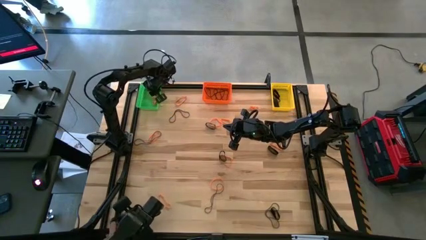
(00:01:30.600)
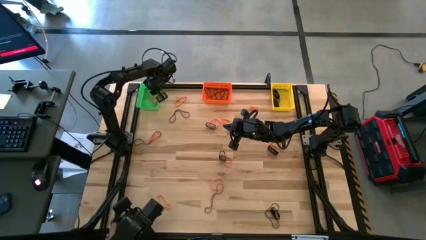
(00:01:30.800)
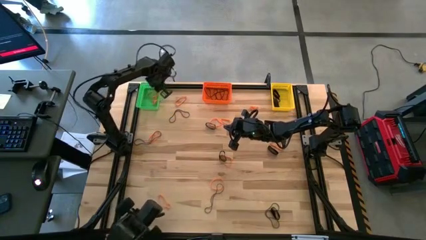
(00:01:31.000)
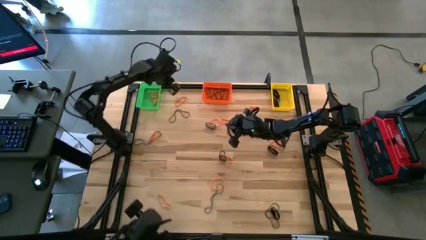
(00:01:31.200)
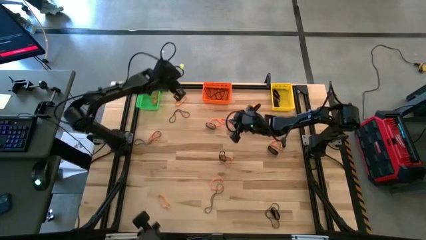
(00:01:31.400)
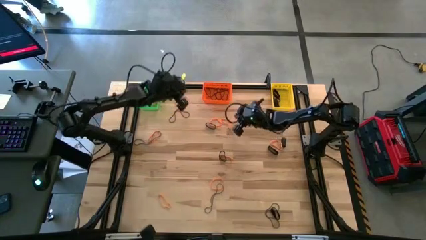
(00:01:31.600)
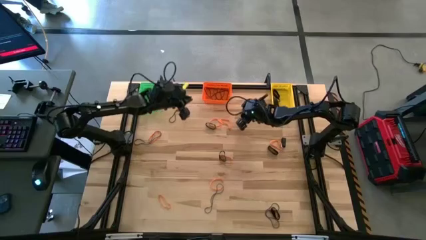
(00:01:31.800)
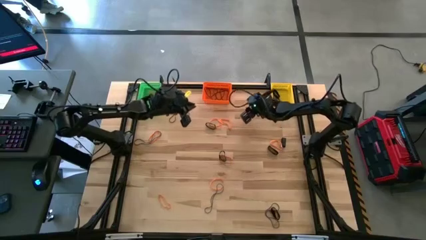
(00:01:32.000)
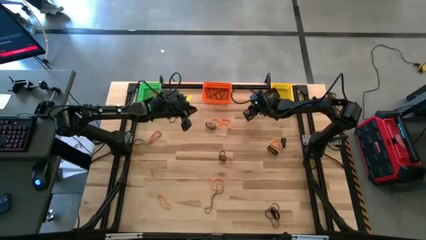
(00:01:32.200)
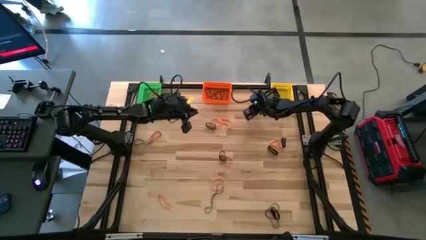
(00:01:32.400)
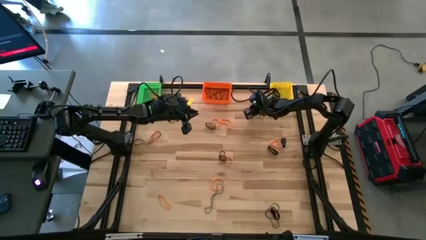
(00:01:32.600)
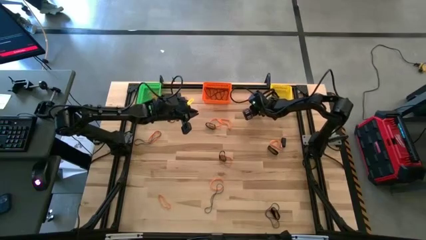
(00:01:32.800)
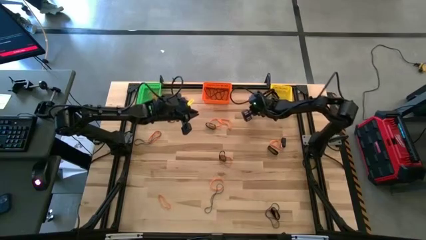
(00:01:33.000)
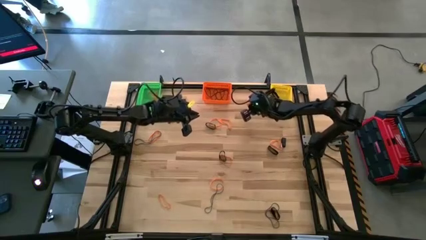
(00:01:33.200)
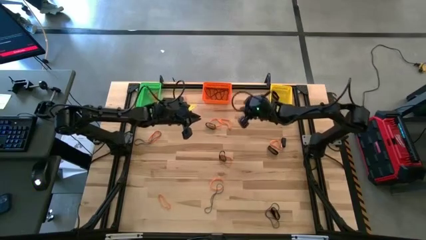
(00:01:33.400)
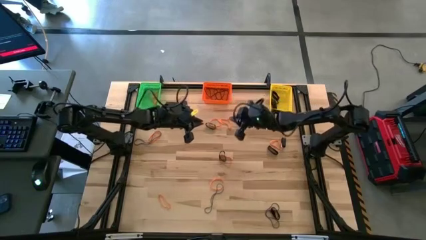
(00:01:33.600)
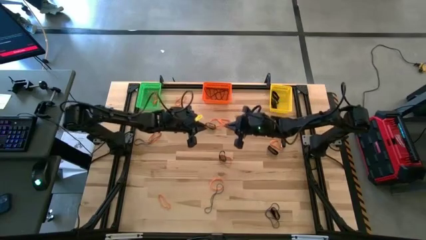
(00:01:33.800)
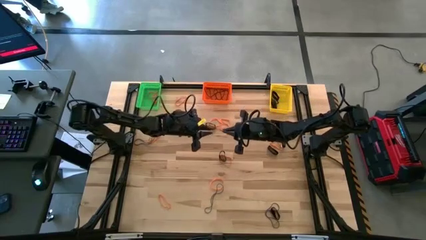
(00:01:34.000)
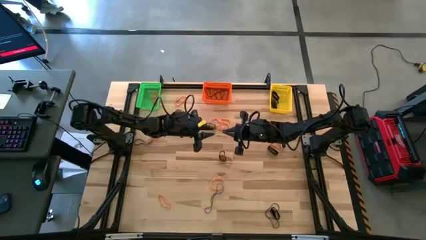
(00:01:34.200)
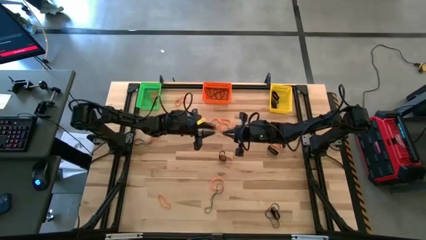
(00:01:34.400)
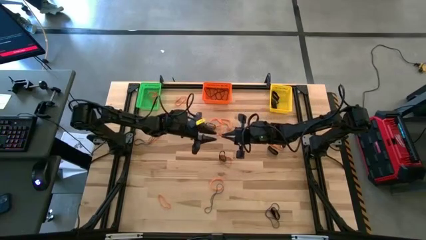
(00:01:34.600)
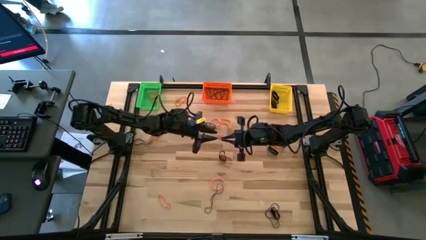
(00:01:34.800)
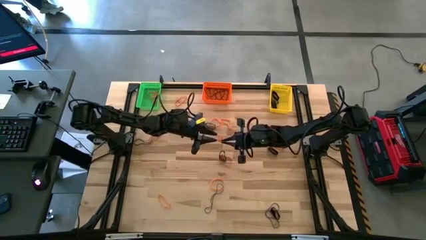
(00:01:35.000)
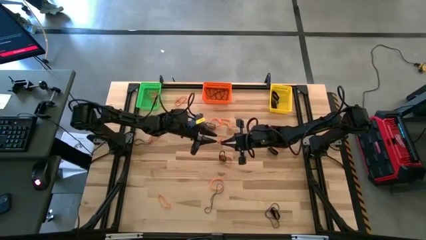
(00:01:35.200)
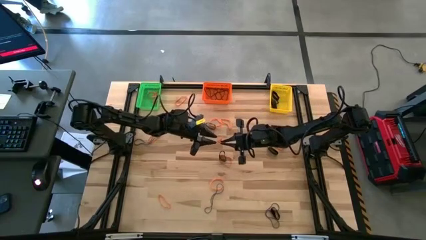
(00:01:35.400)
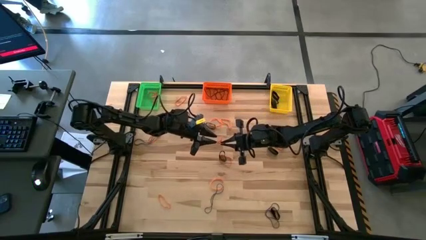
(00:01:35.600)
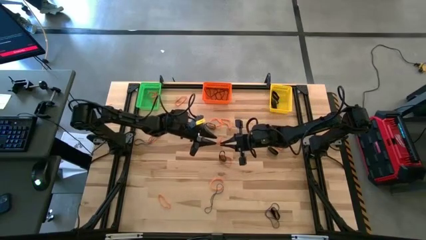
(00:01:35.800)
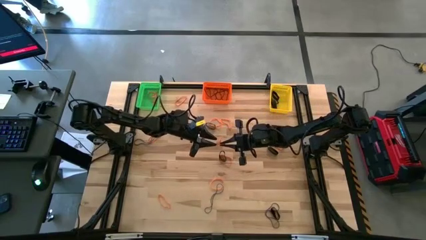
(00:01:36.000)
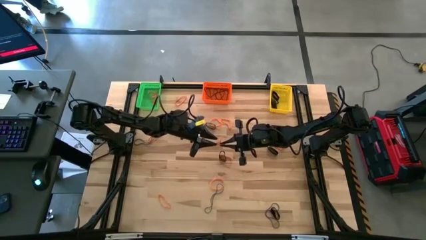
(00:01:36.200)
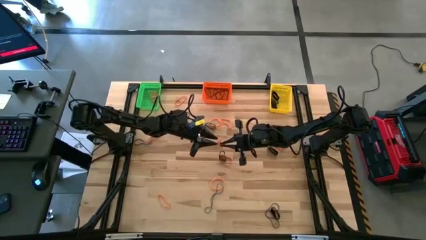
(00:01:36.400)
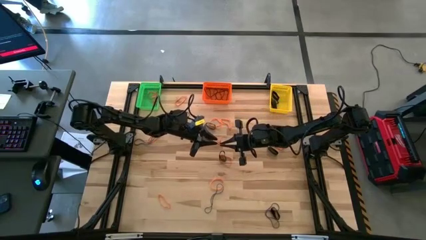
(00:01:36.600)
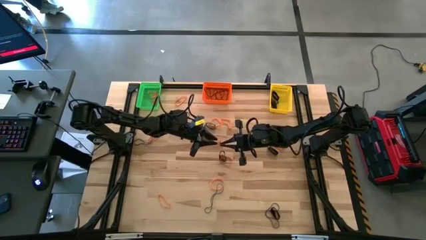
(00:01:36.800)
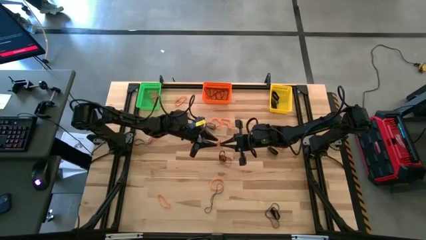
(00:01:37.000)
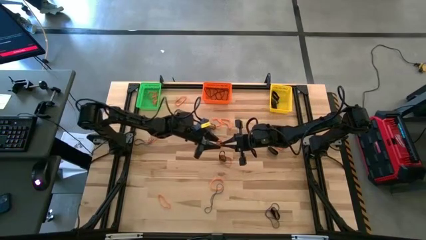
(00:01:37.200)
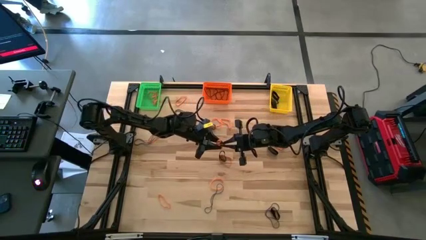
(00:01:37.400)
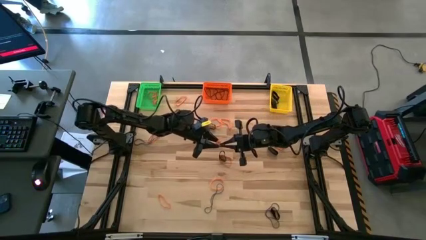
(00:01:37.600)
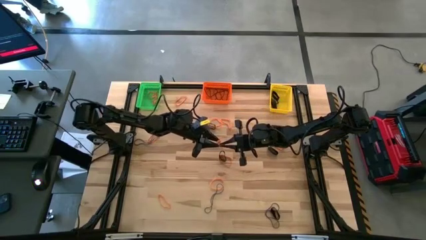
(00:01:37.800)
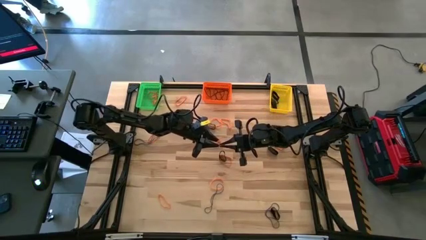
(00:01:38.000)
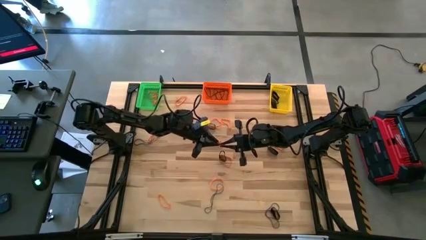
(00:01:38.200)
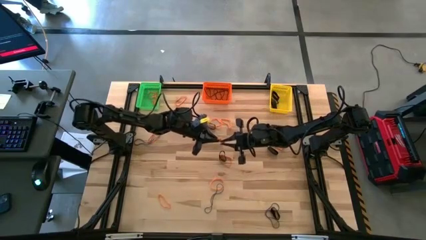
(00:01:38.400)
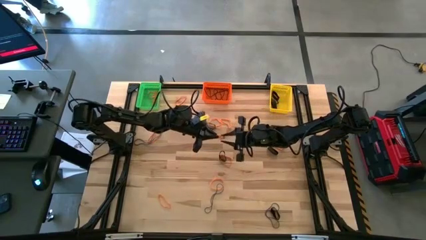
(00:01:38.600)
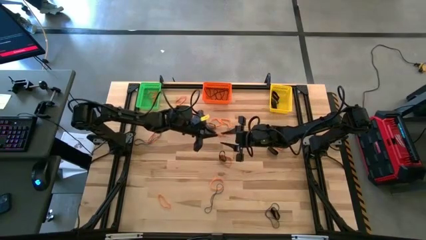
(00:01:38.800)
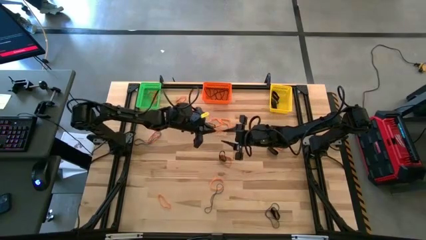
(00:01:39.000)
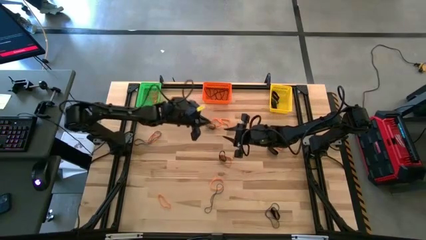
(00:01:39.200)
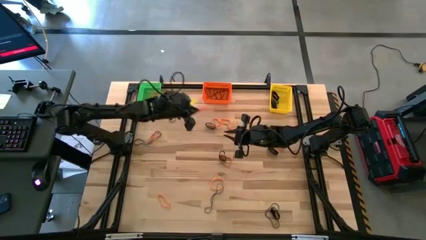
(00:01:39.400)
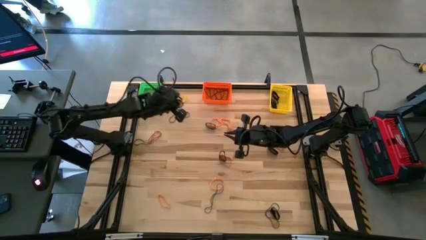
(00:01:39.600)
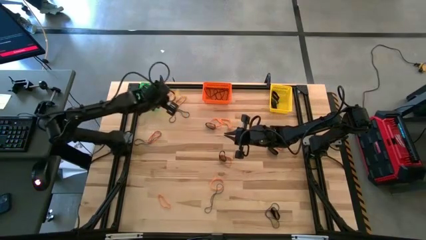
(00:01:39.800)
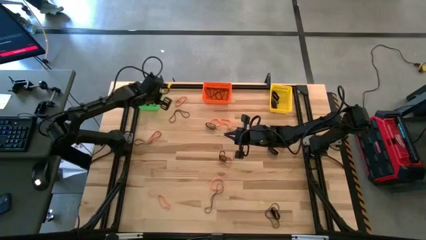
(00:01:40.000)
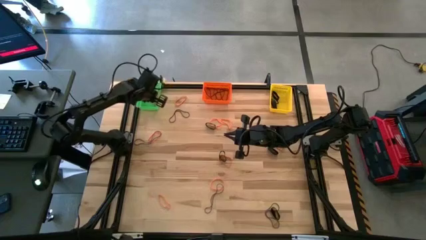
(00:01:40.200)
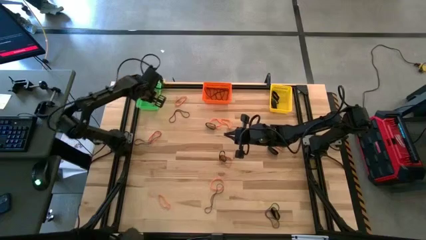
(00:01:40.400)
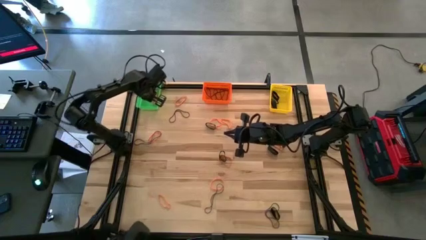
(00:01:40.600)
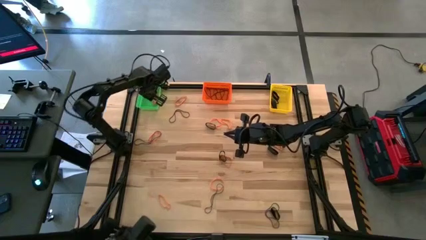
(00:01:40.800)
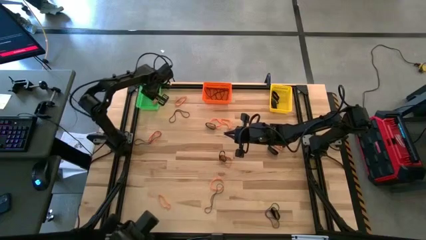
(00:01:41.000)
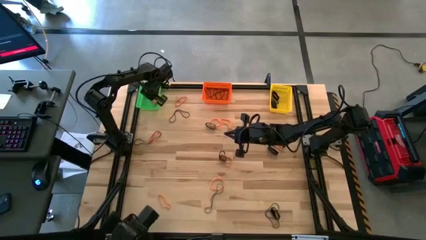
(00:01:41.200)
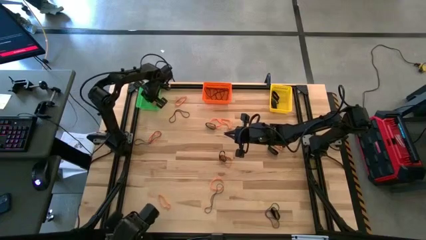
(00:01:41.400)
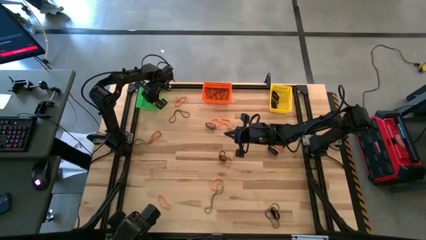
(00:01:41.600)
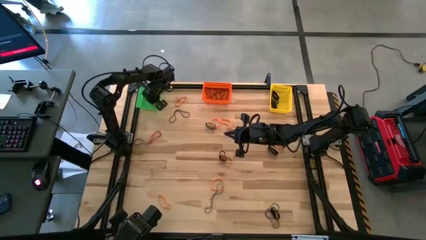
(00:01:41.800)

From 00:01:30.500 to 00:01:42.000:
Task: Sort rubber bands into baskets
Put the top right orange rubber band into the green bin

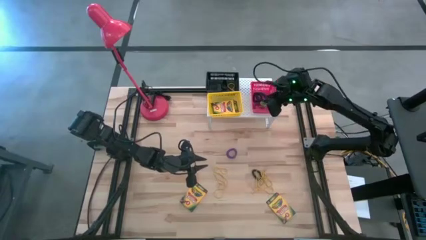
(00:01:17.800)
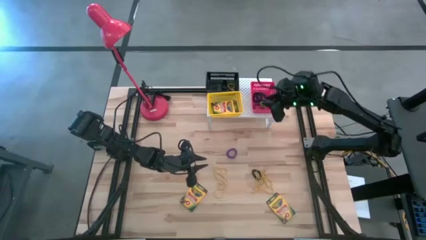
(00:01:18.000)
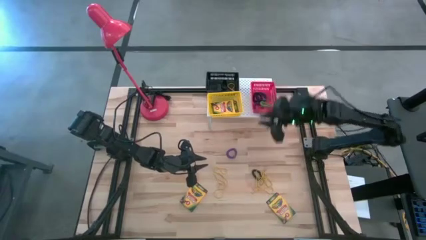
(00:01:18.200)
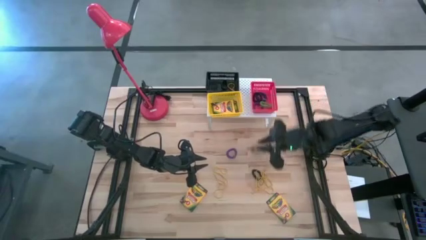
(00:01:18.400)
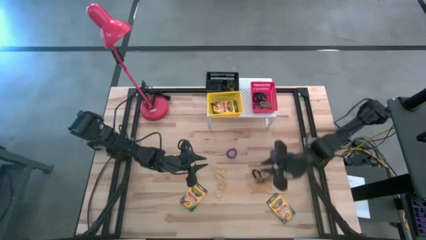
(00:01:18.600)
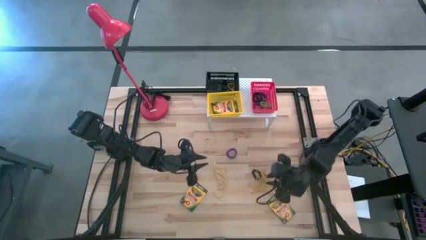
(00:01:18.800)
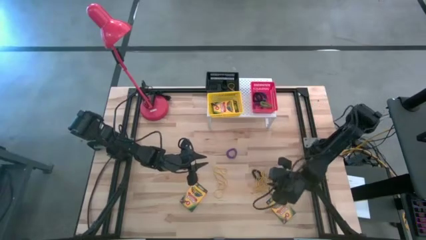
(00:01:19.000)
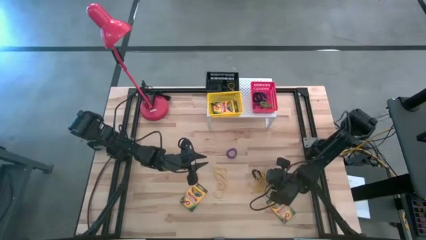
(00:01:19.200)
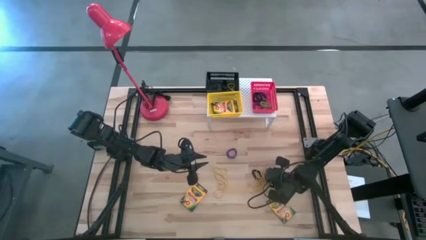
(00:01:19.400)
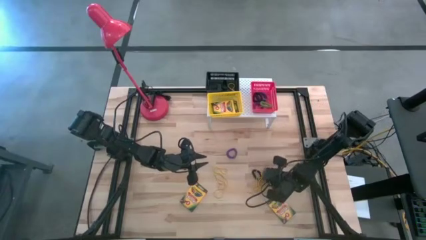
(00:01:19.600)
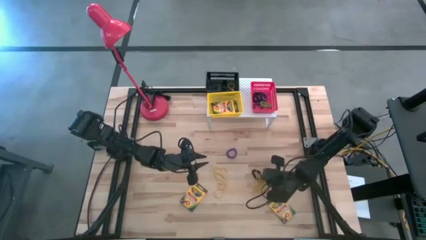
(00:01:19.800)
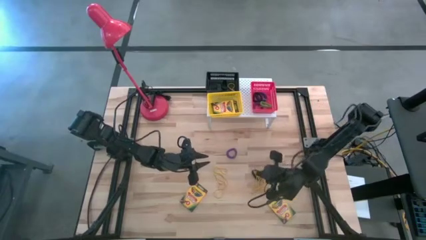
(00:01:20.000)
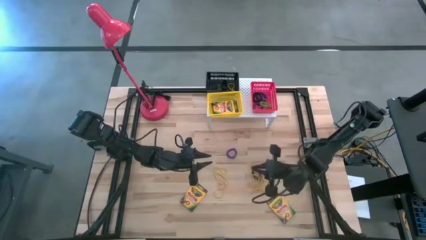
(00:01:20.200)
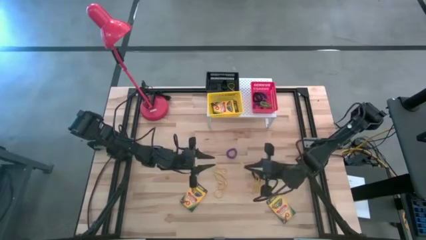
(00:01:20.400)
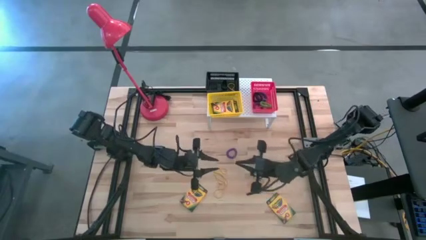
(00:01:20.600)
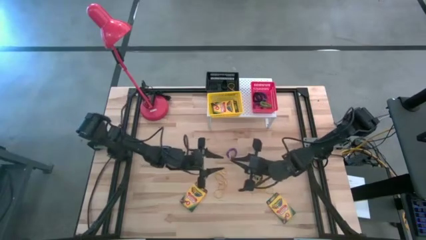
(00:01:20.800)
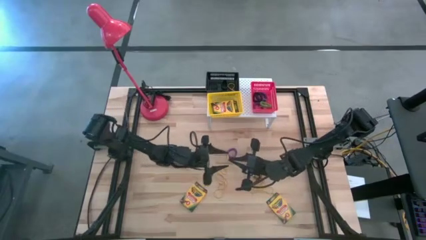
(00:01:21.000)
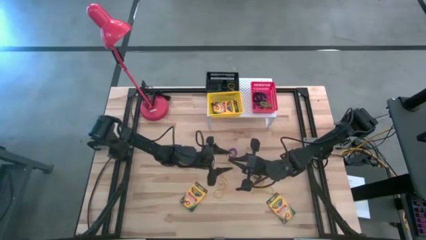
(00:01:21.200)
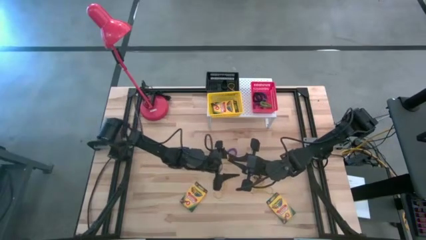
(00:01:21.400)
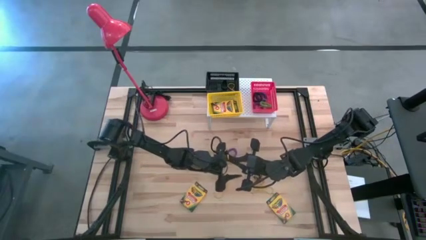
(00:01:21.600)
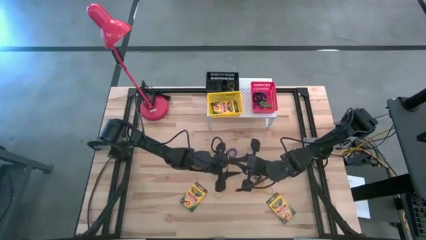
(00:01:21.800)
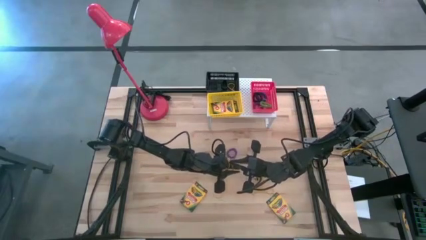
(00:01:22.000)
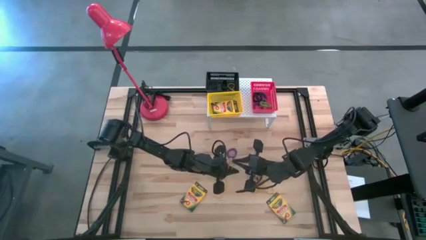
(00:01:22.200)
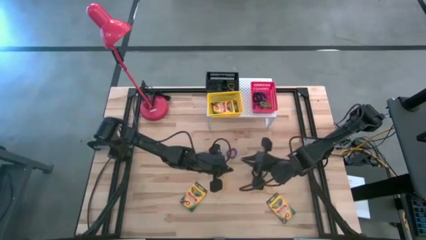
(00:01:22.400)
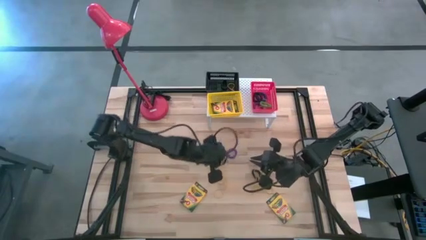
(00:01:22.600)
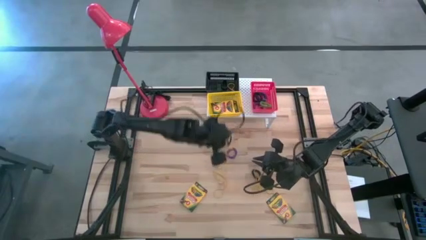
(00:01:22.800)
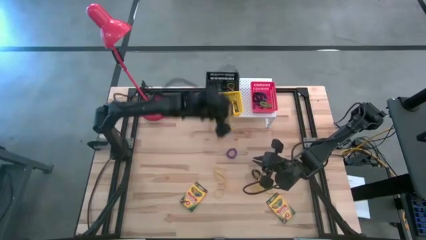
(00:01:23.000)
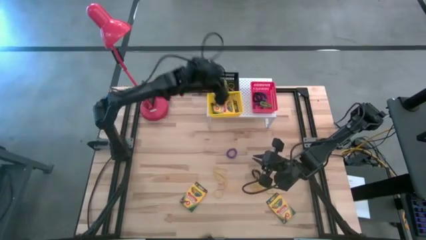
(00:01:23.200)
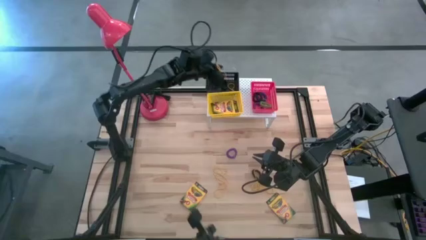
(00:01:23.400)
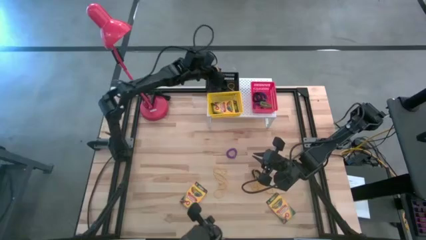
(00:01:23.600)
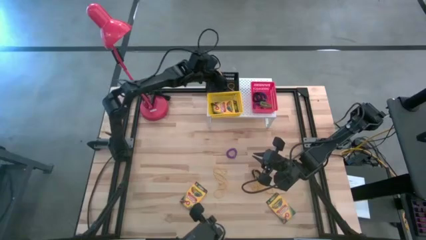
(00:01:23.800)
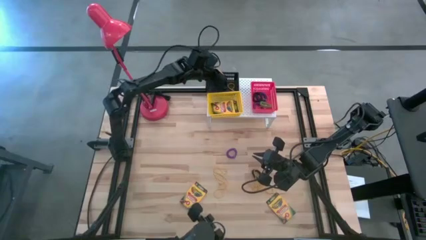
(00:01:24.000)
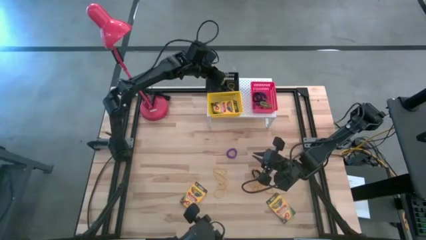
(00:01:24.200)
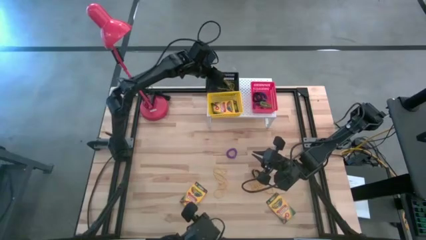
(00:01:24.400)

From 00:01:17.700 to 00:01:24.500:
Task: Pick & Place Office Desk Supplies
Put the yellow rubber band into the black bin on the shelf
